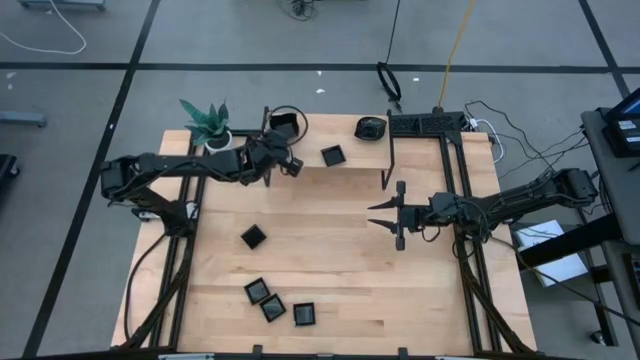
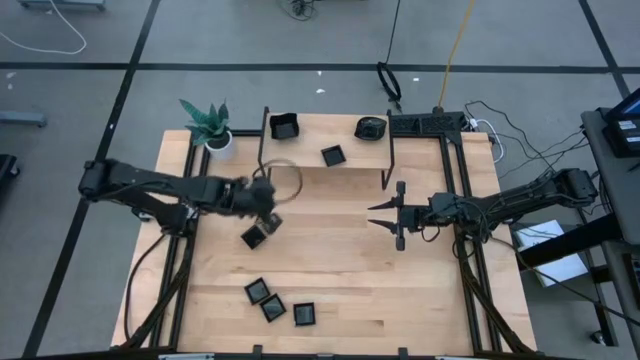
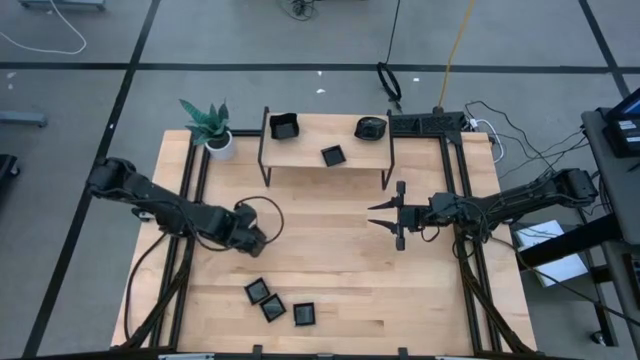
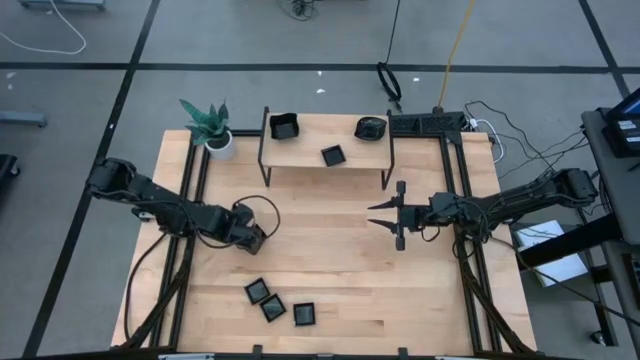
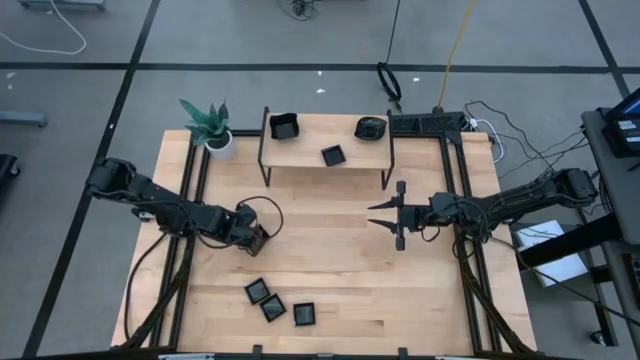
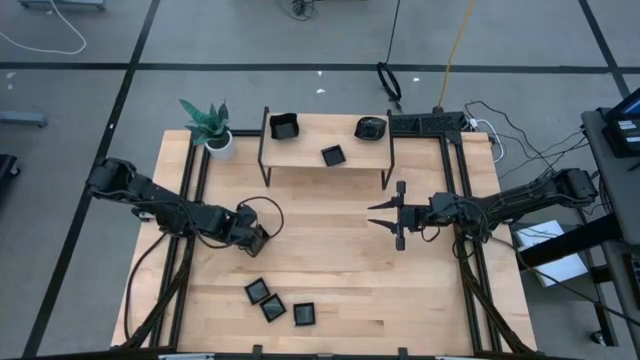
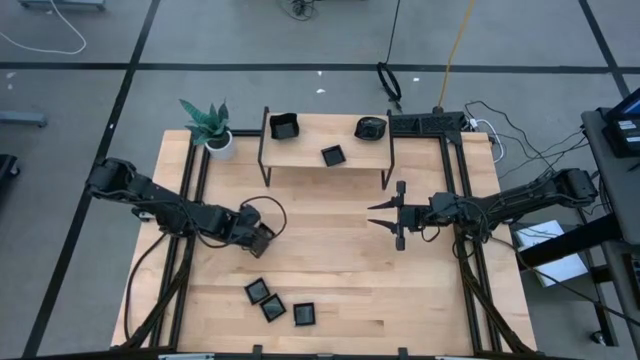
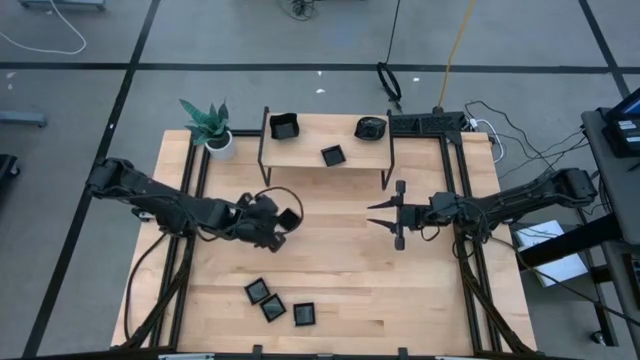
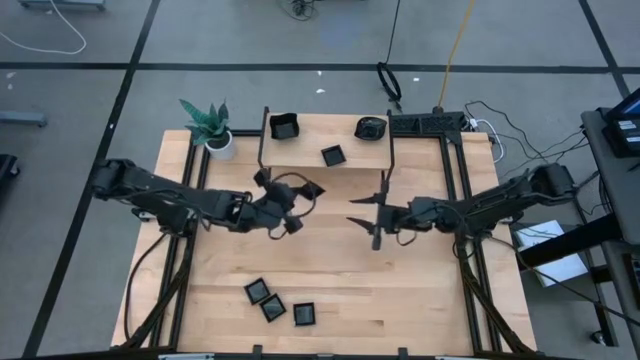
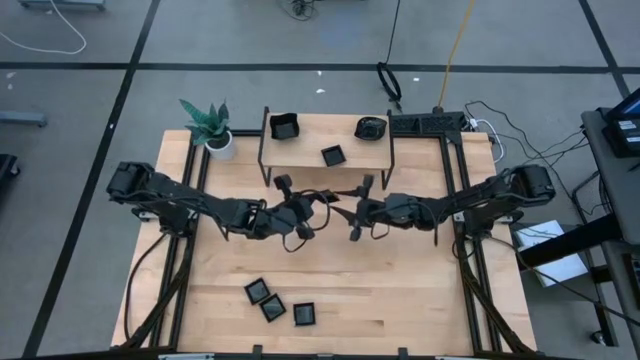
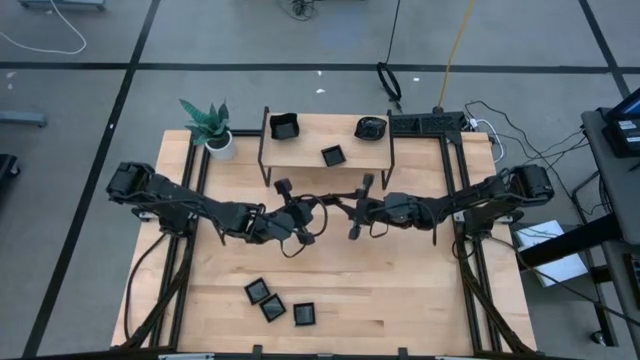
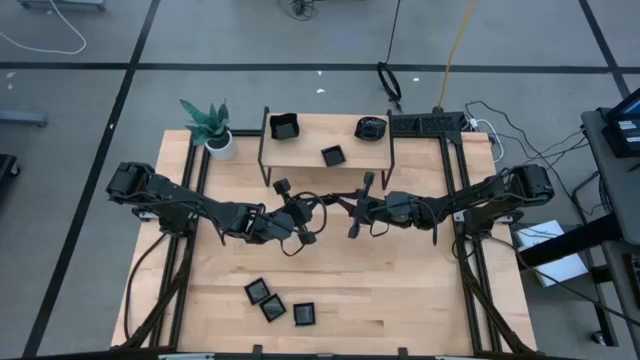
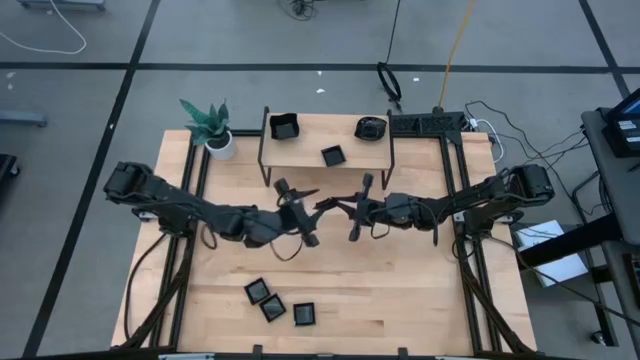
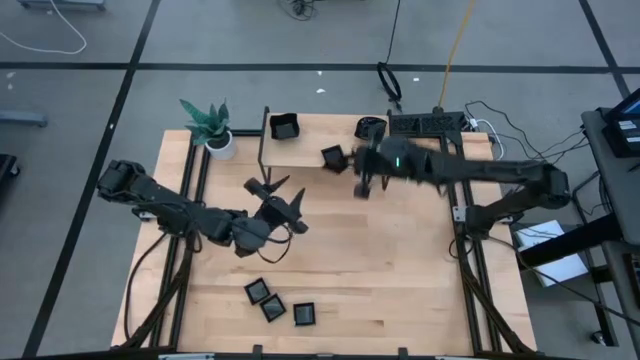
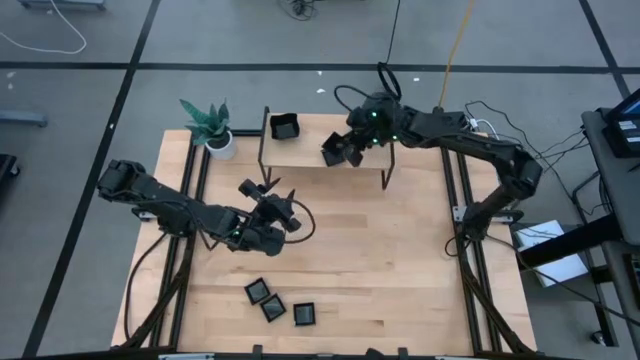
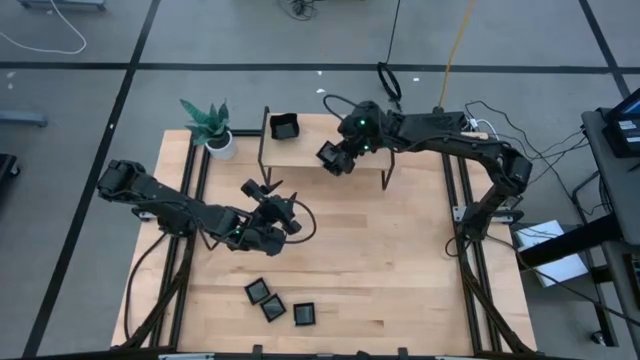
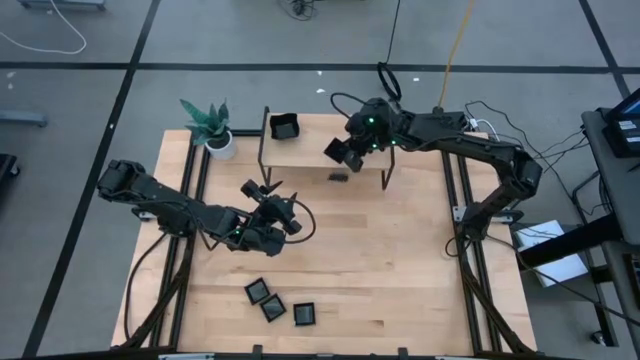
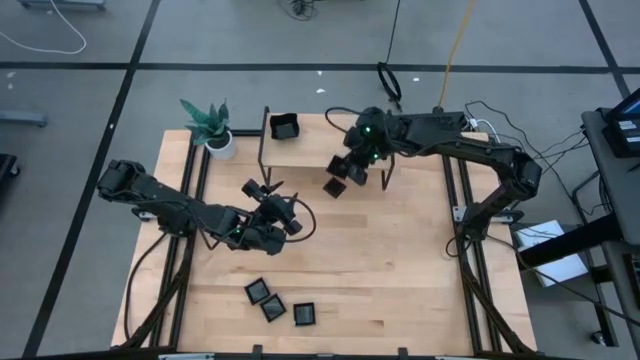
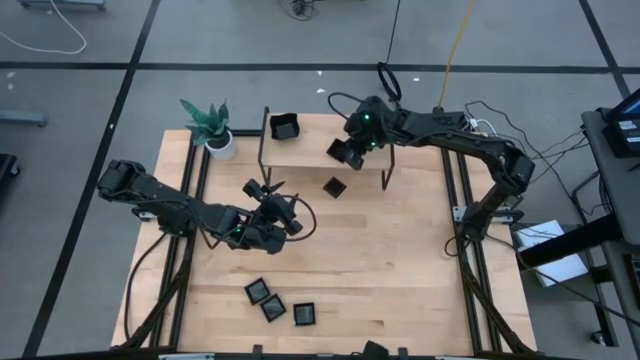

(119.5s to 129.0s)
Task: Pick & Place Mini shaped plates
Stack the black square plate on top of the other black square plate on the shelf

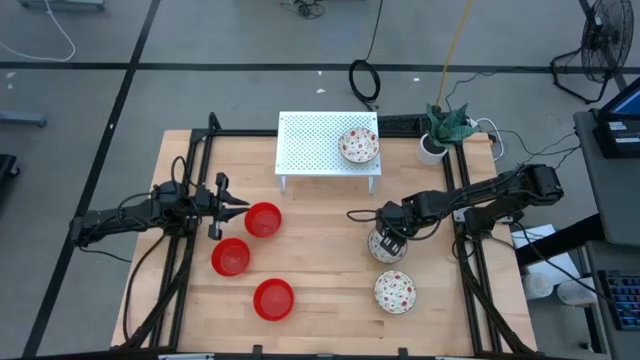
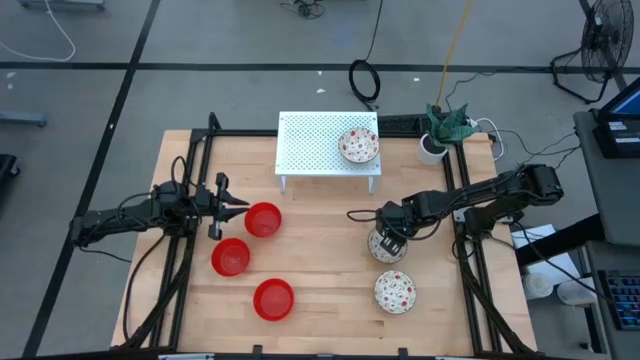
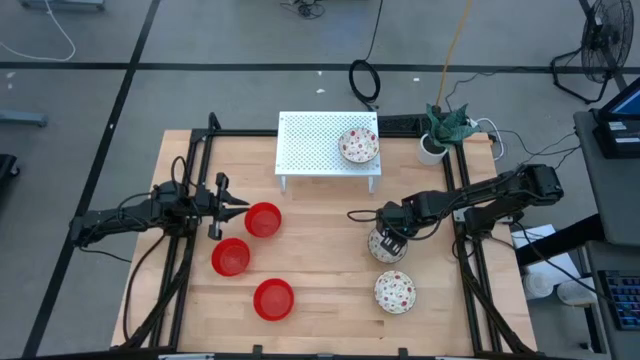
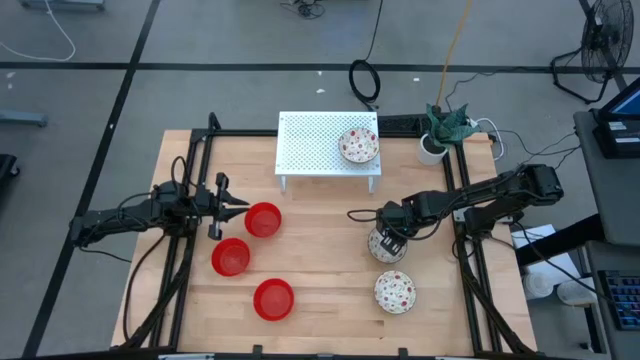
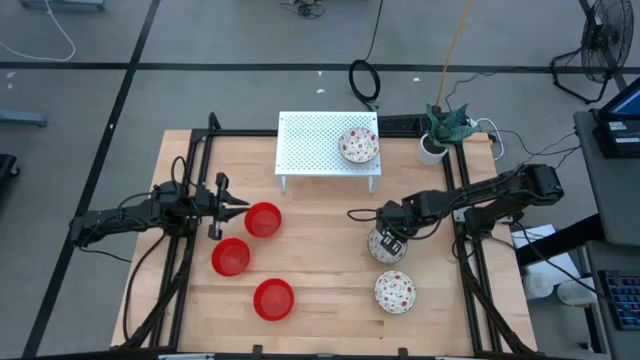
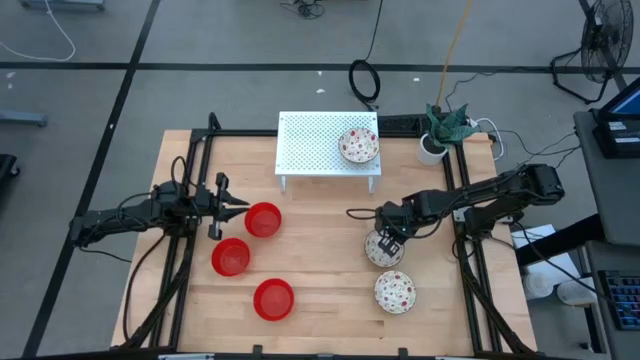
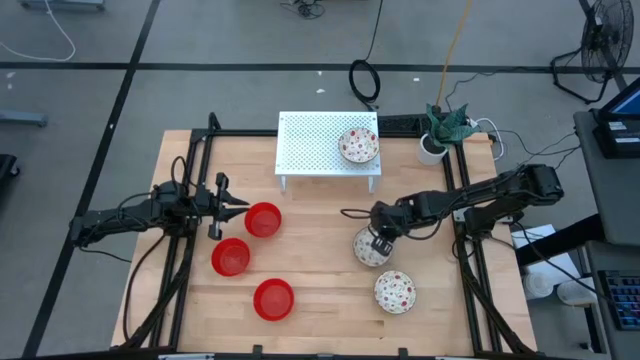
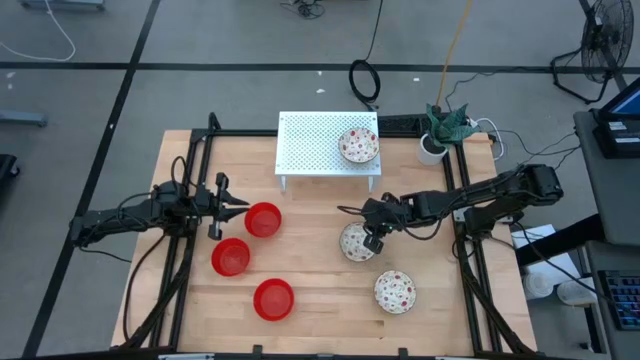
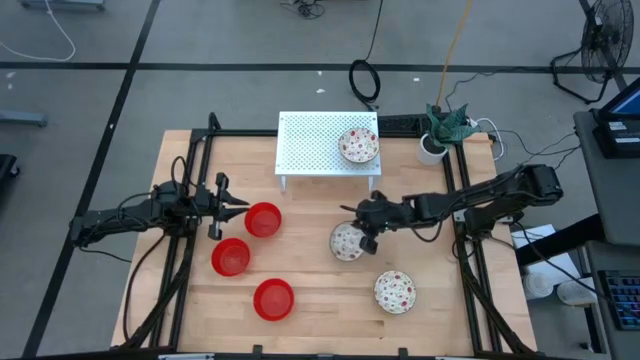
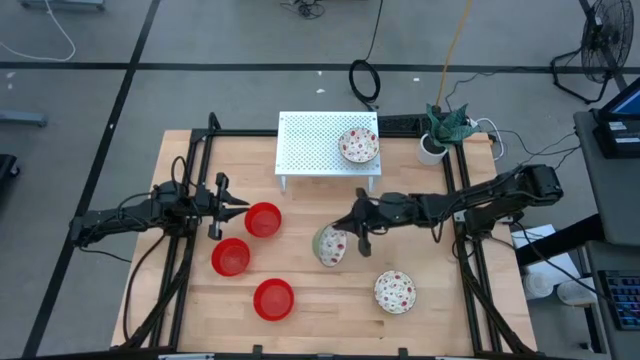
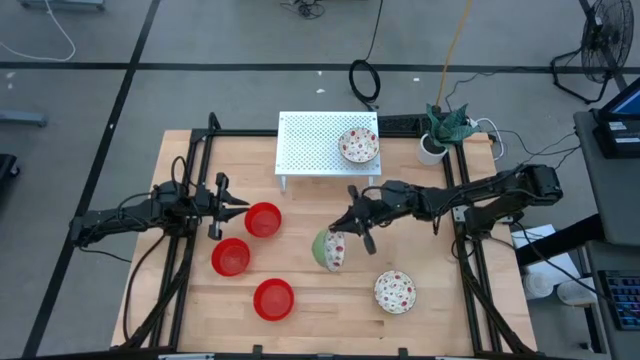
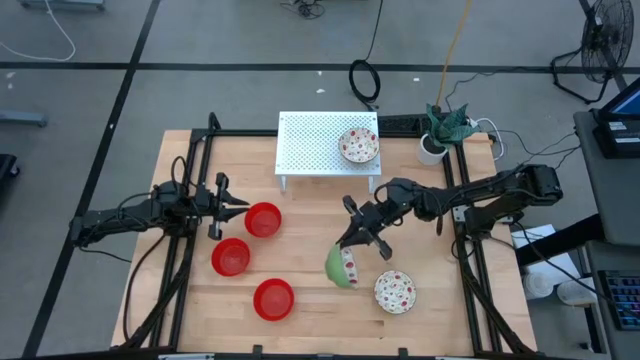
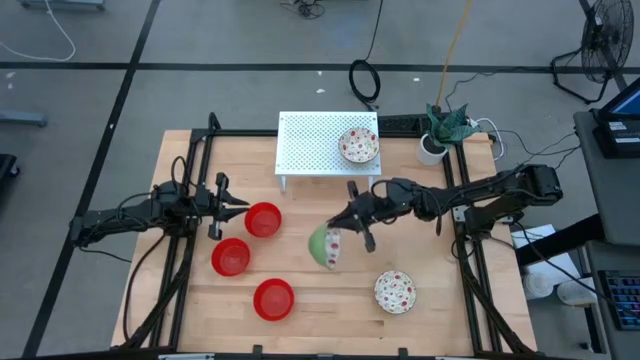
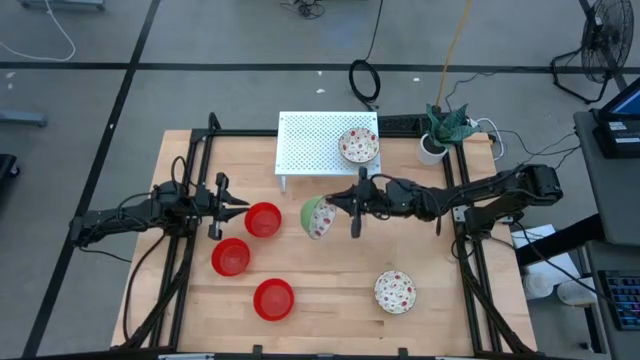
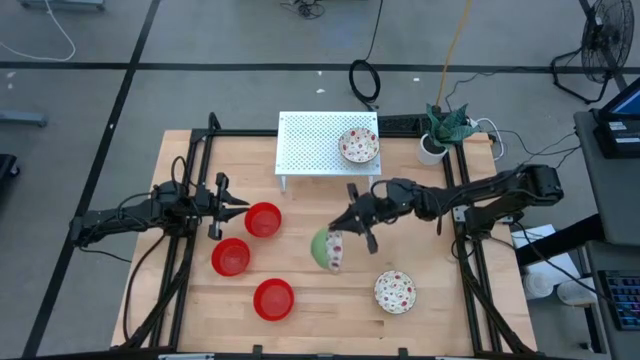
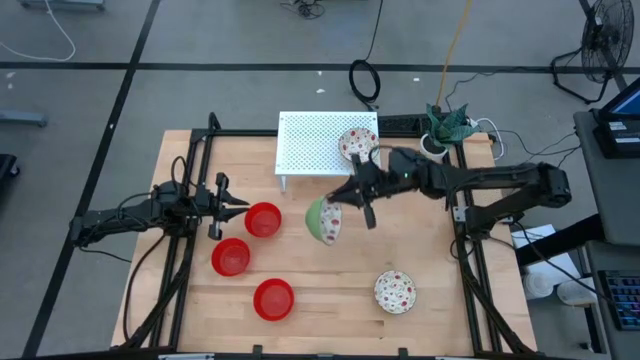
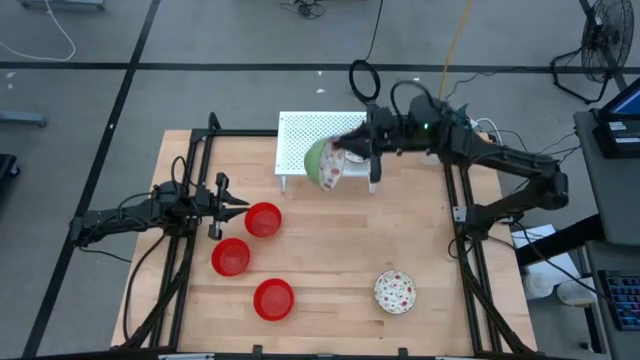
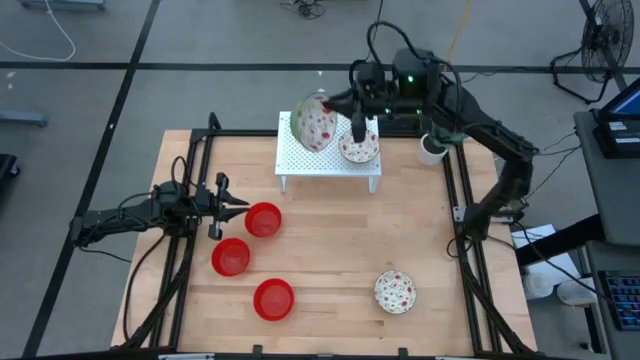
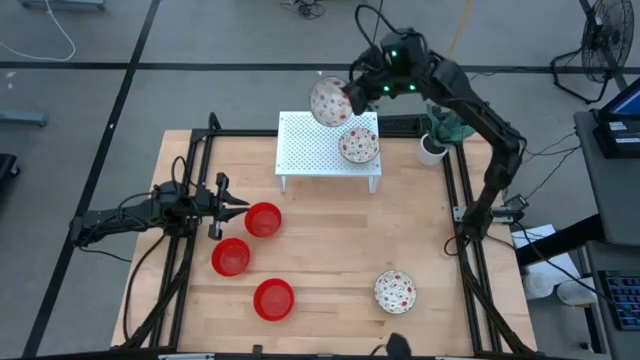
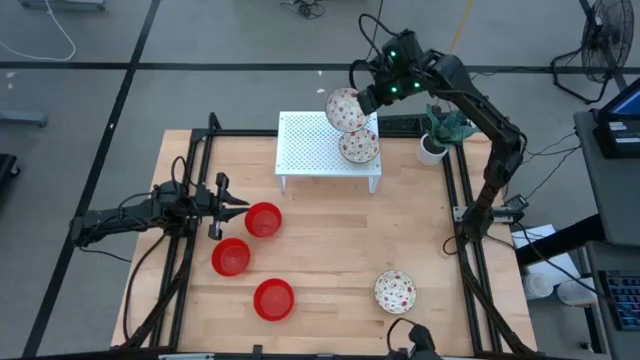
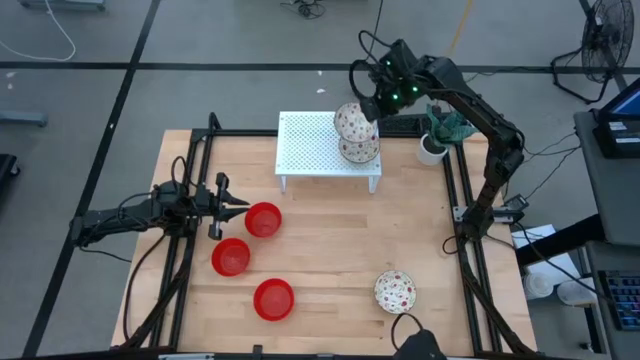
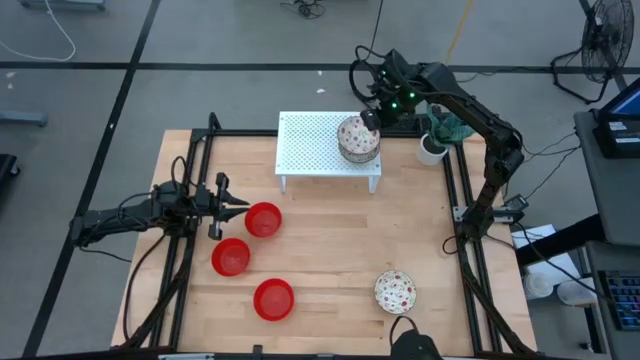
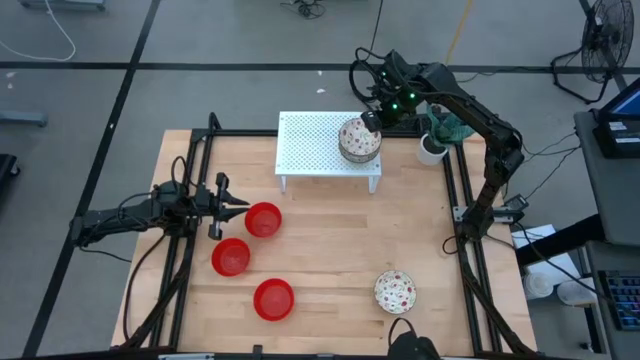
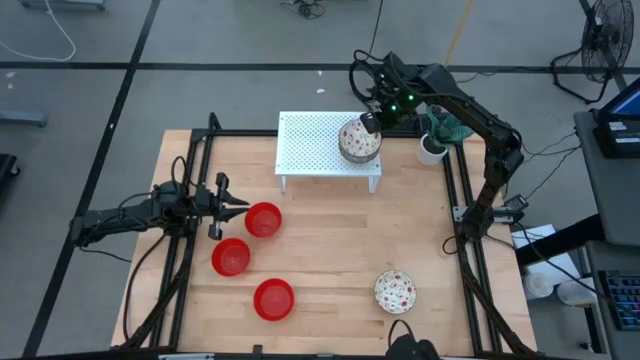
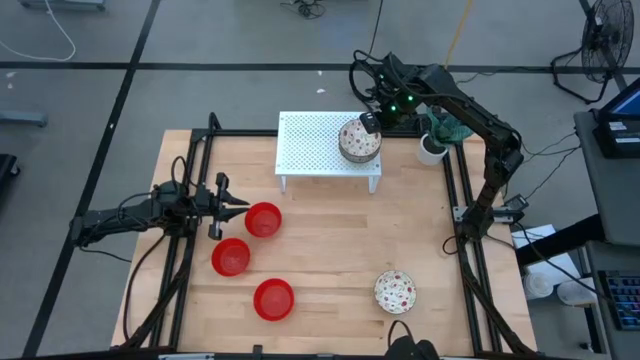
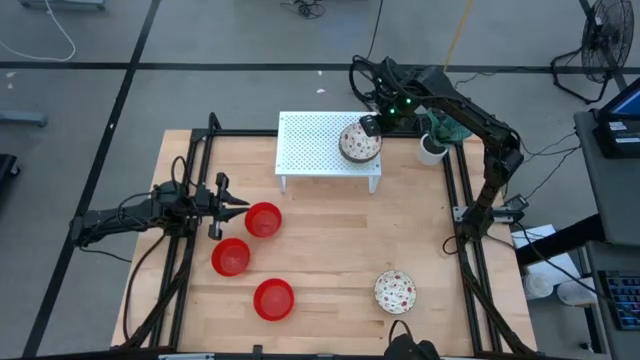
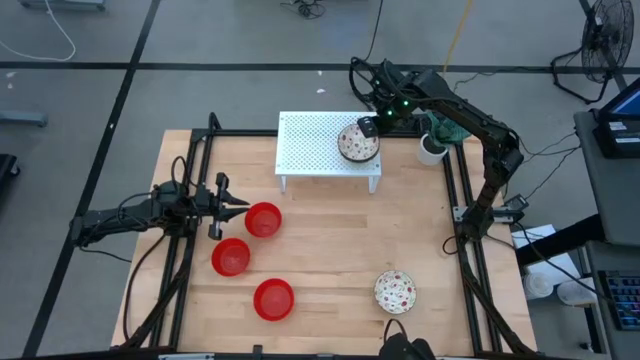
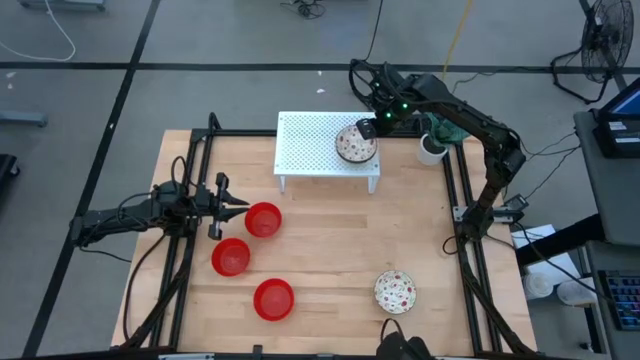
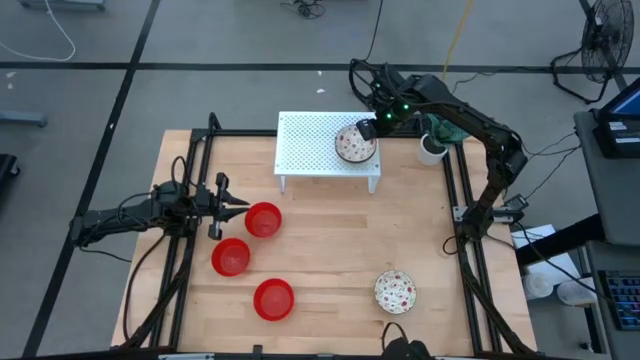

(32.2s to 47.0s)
Task: Pick & Place Mini bowls
Stack the top white patterned bowl on the white patterned bowl on the shelf
